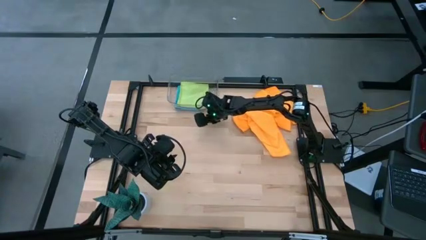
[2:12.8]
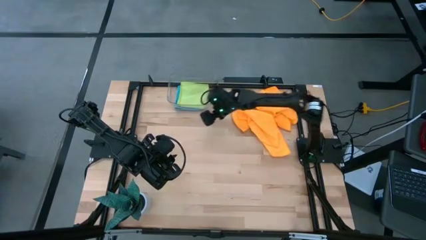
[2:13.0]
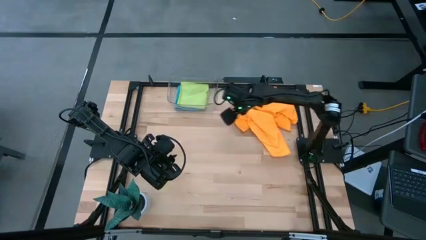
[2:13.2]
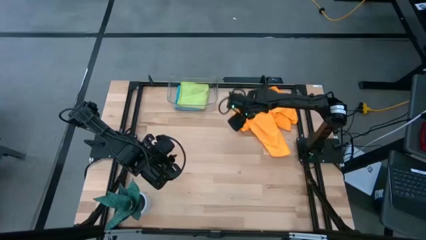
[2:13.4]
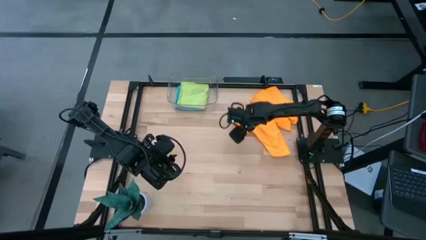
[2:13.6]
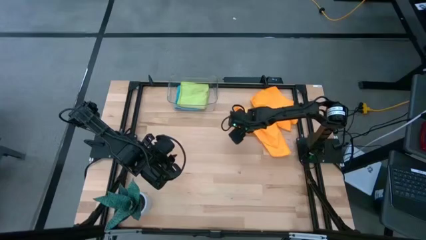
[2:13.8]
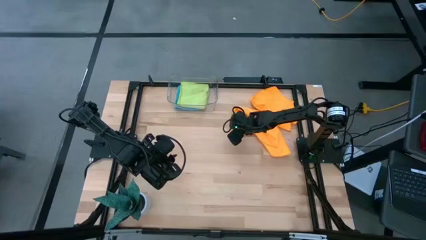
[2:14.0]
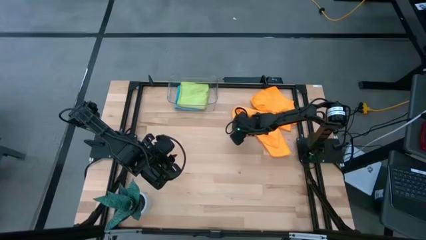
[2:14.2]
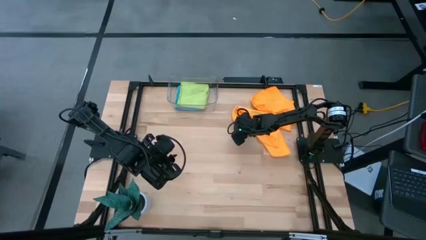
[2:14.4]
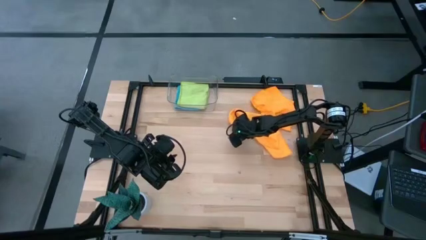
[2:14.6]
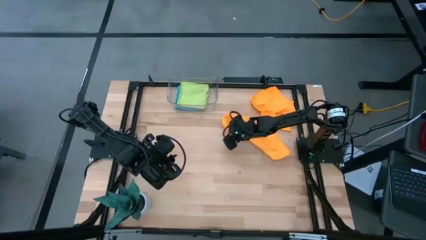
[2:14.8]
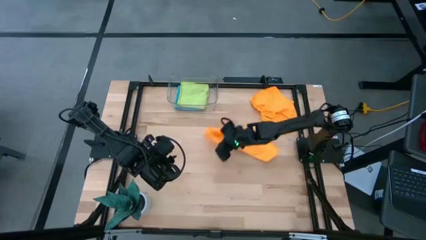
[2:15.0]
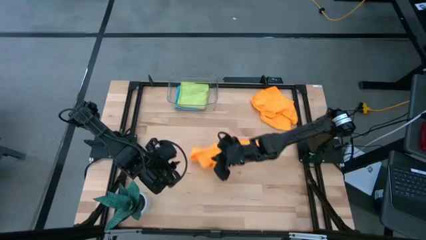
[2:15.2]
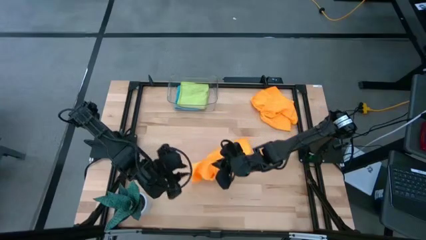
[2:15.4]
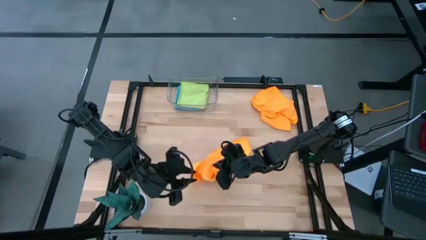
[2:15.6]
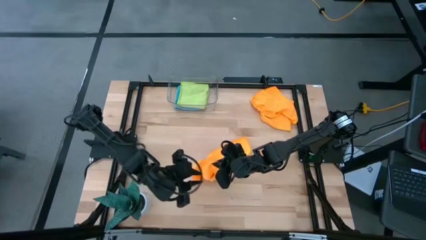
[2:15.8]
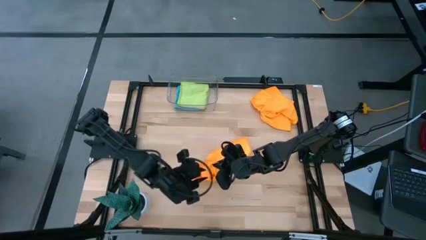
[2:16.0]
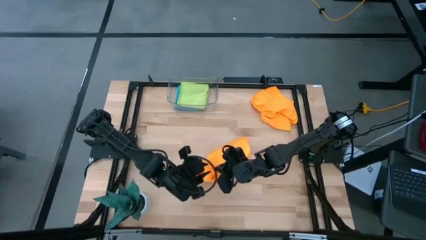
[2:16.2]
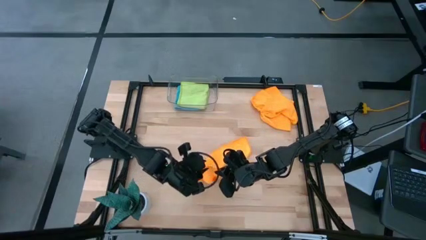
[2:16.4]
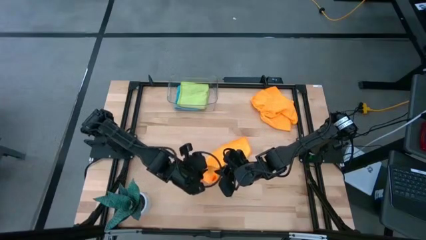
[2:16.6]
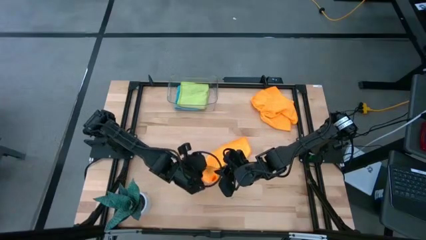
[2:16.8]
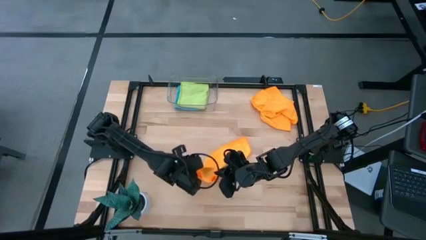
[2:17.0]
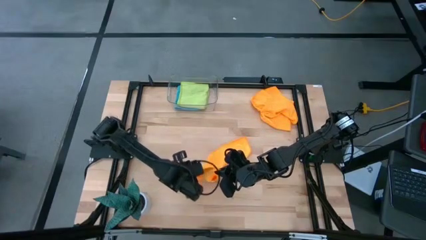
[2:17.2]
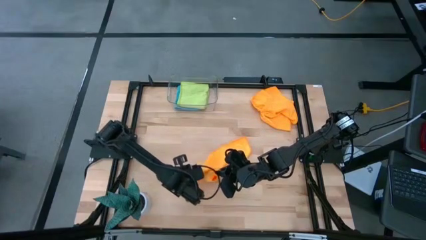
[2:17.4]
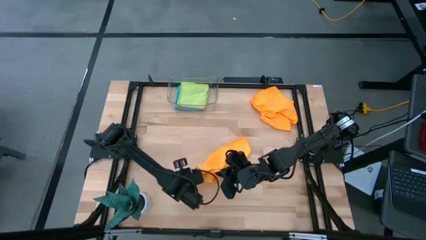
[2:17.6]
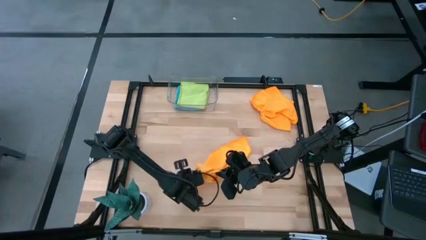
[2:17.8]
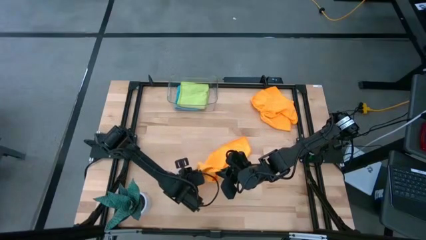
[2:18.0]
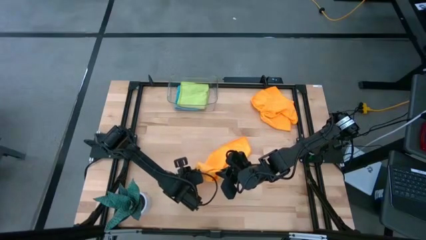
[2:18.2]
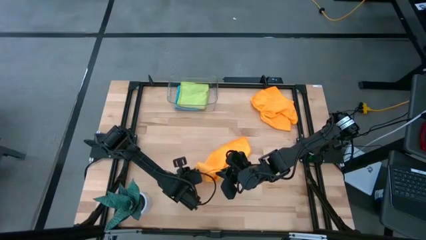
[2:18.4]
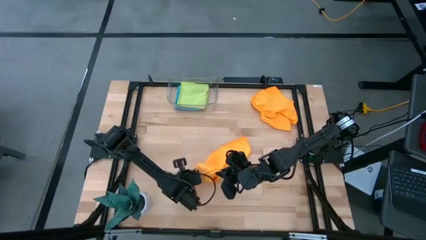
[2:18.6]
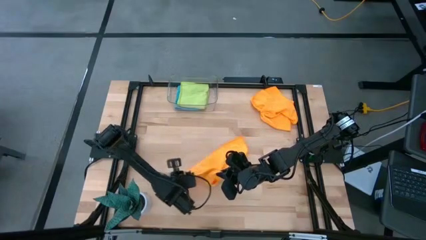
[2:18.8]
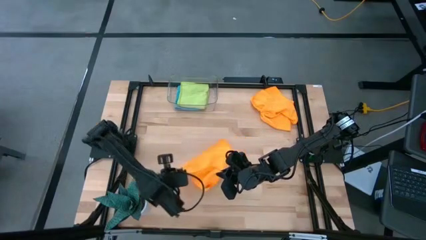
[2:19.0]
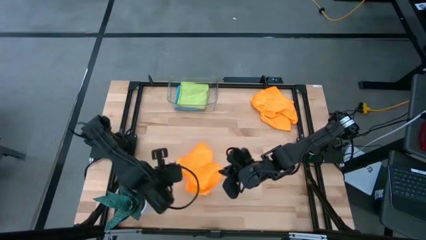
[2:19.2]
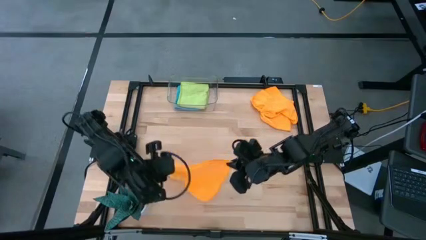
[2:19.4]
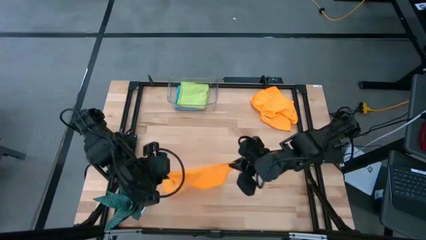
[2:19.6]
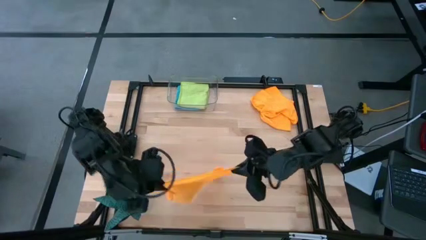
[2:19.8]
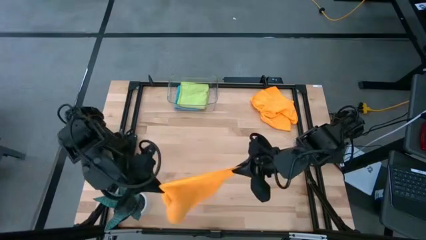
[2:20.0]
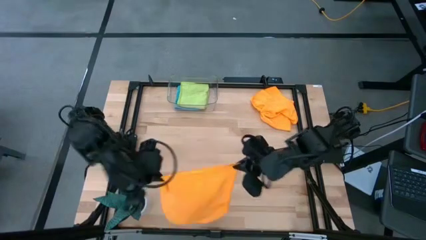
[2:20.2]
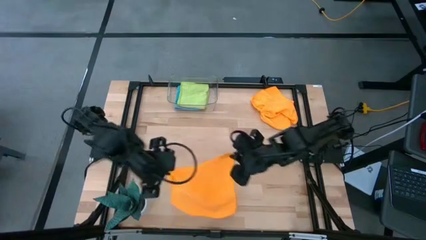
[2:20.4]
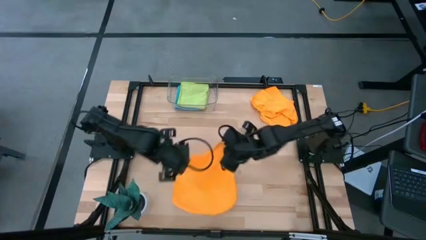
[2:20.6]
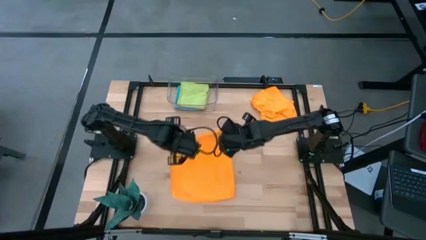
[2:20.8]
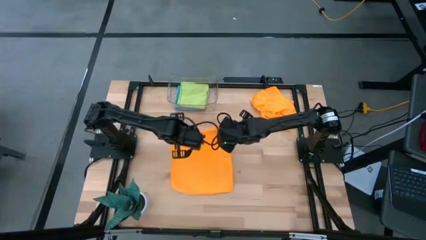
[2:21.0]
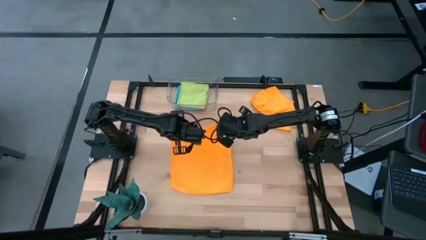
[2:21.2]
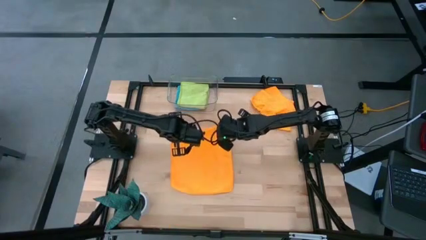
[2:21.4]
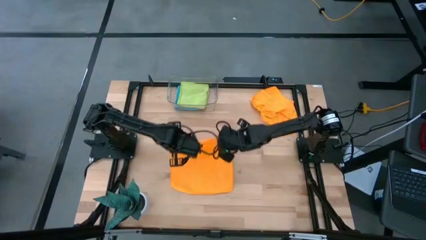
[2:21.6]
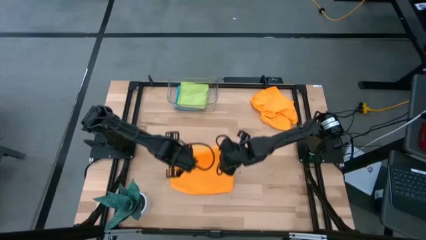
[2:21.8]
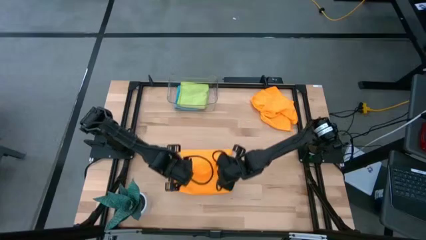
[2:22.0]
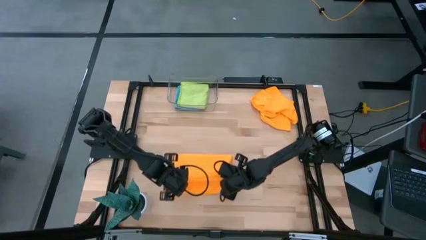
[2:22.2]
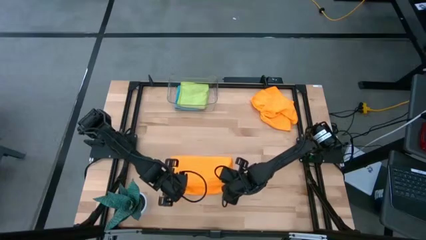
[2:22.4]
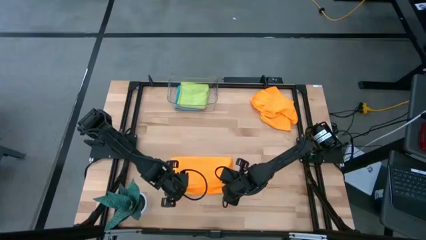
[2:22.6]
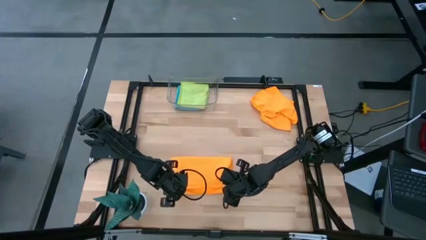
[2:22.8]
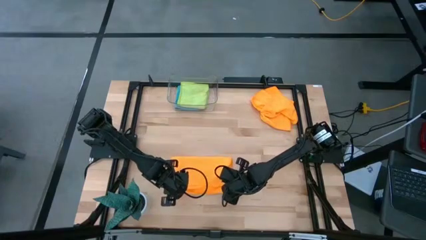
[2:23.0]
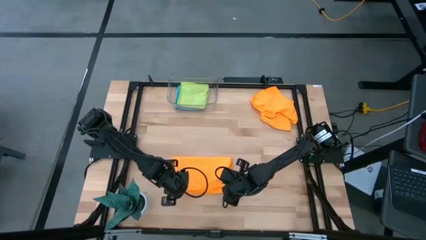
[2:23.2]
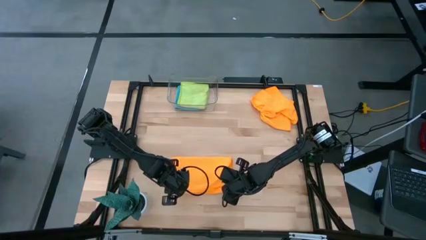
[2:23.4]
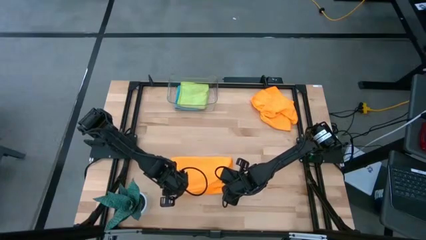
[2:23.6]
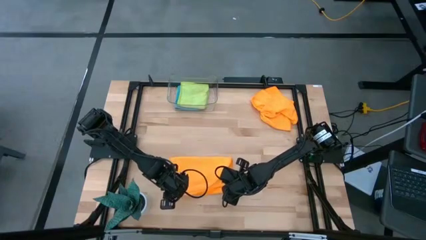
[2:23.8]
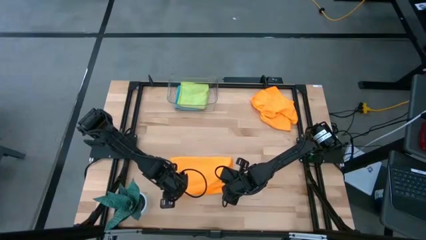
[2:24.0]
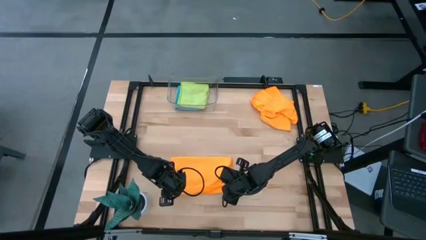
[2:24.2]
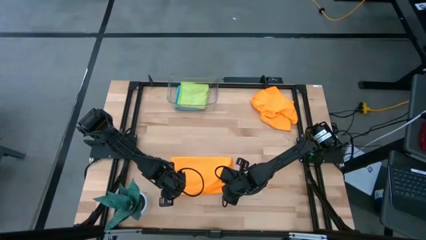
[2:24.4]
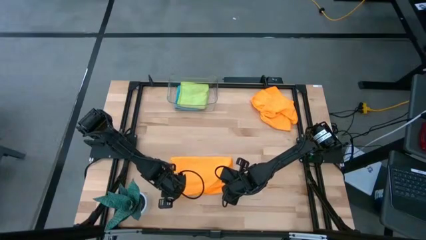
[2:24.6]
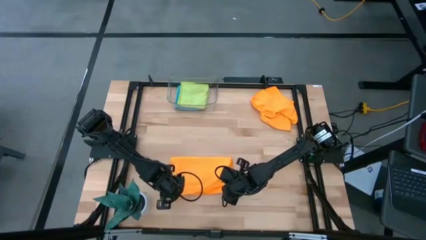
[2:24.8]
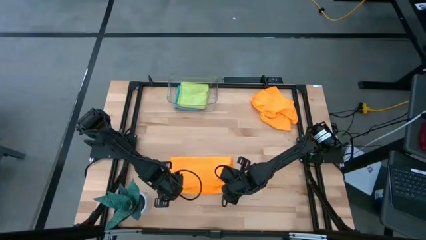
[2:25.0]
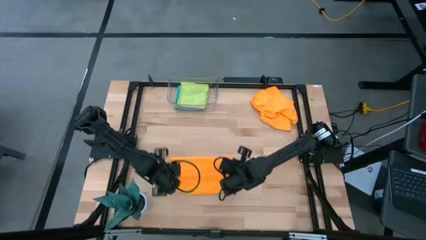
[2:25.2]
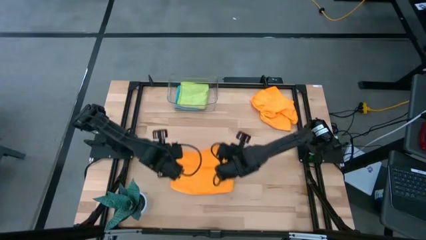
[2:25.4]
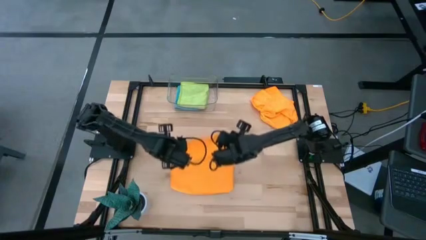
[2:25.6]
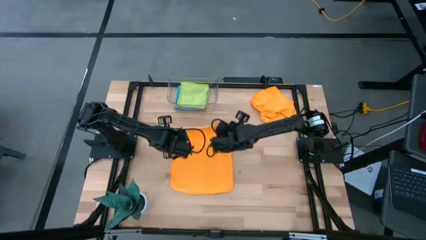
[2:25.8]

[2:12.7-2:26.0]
Task: Fold microfiber towels
Fold the bottom orange microfiber cloth

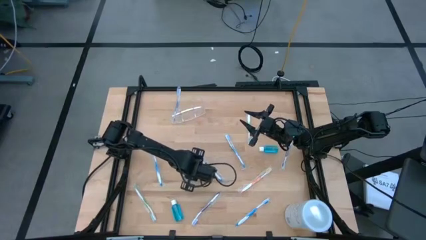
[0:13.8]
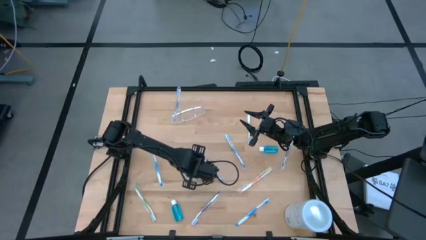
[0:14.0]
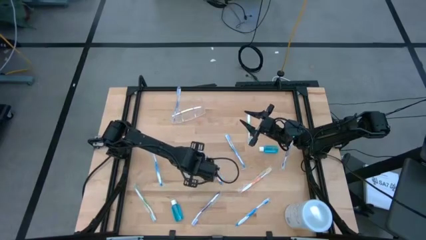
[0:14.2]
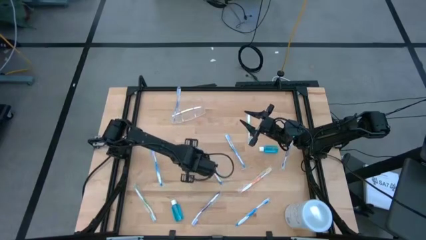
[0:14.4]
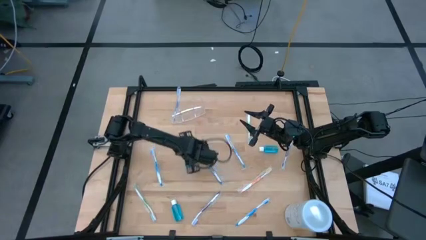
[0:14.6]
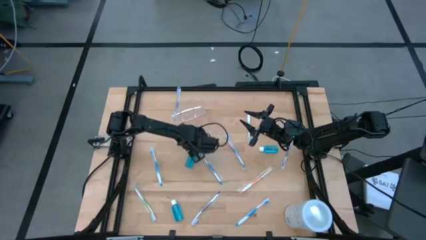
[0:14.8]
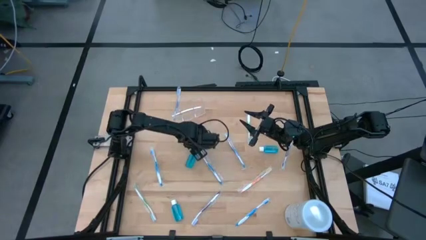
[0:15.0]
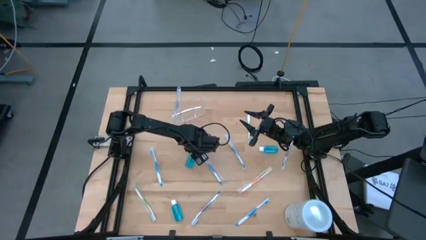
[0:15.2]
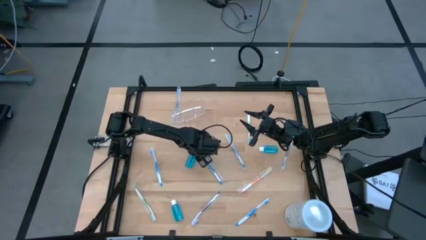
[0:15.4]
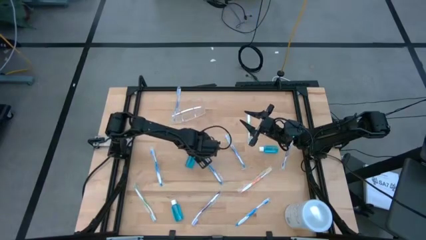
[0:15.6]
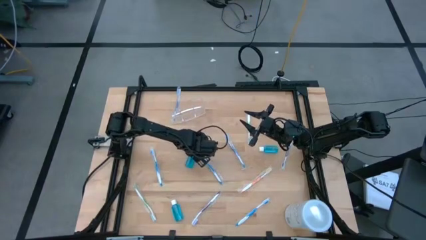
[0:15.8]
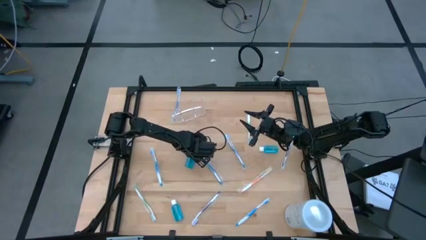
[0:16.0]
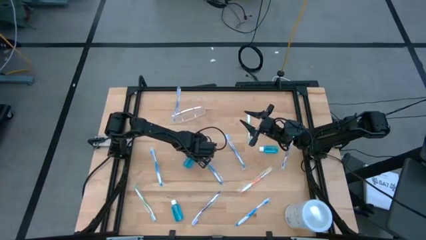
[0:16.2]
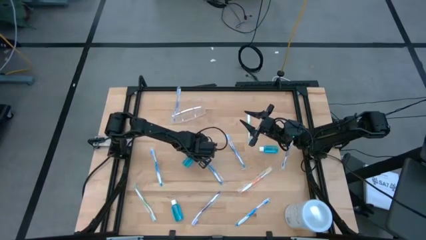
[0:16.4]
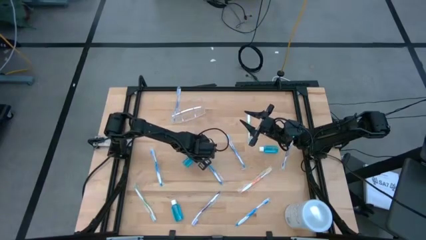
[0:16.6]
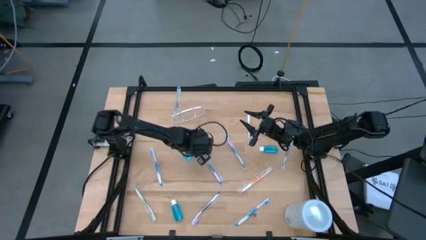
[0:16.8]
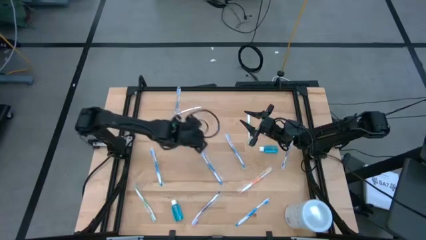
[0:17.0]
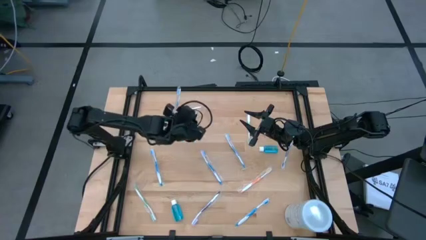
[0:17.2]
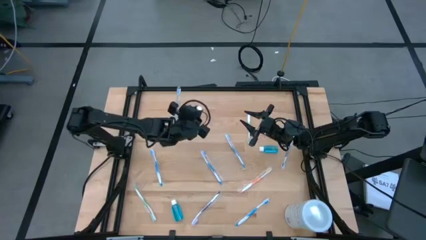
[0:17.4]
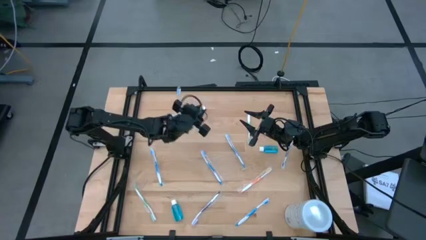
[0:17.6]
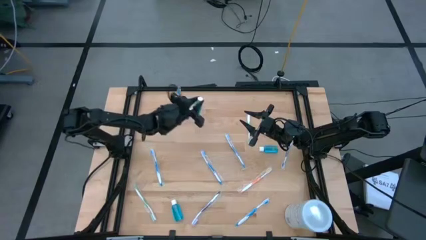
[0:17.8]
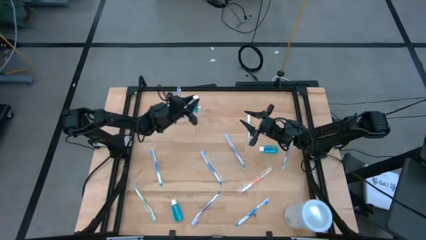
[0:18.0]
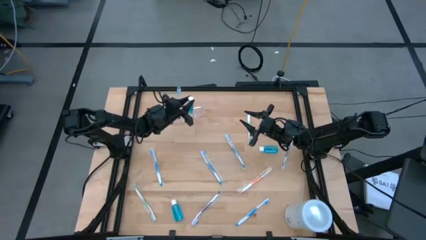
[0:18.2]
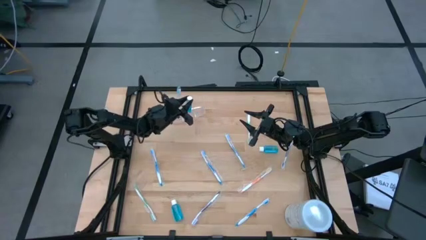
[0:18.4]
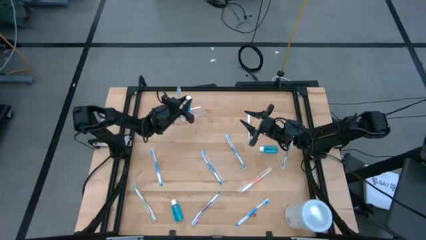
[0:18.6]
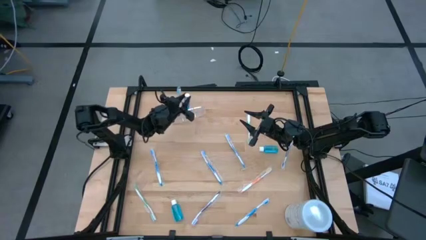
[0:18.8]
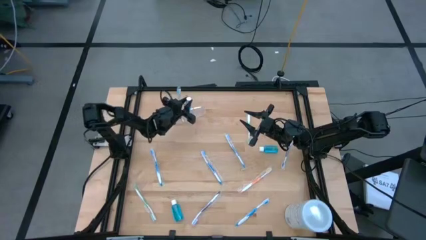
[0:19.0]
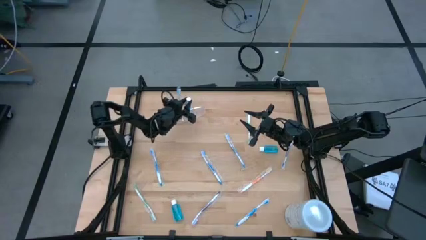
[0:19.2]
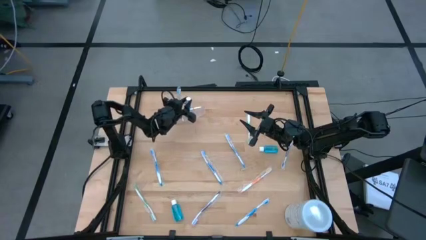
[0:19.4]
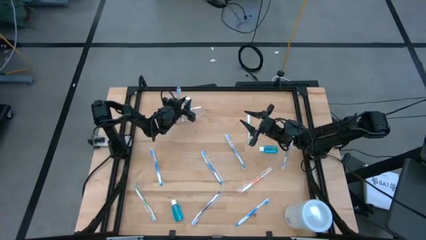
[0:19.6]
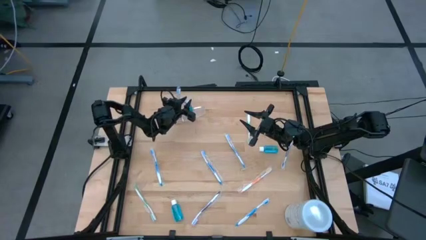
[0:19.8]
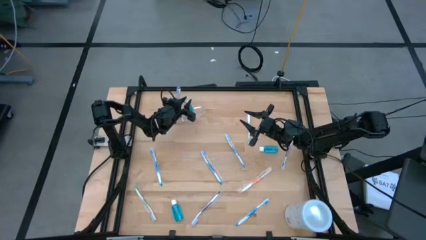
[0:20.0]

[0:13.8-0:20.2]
Task: Pick & Place toothbrushing station
Put the middle small blue bottle into the transparent organizer
